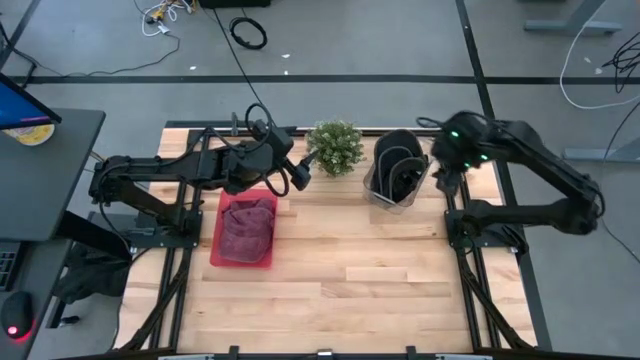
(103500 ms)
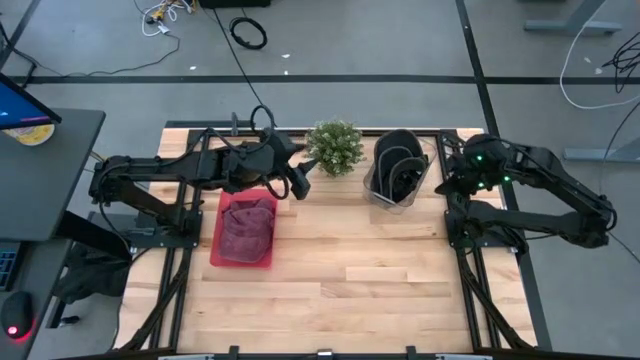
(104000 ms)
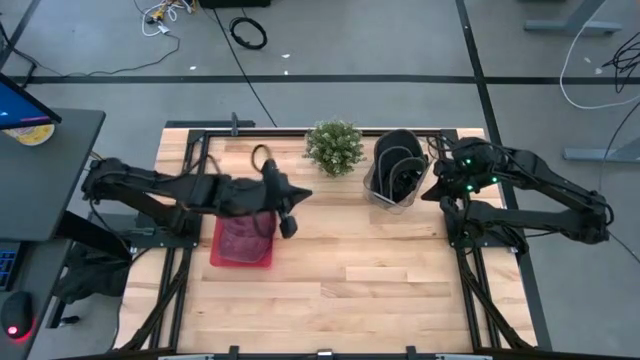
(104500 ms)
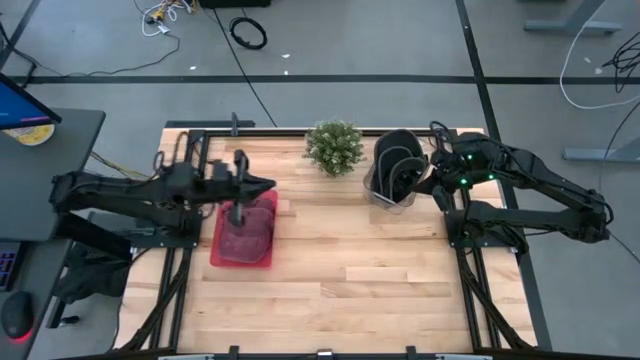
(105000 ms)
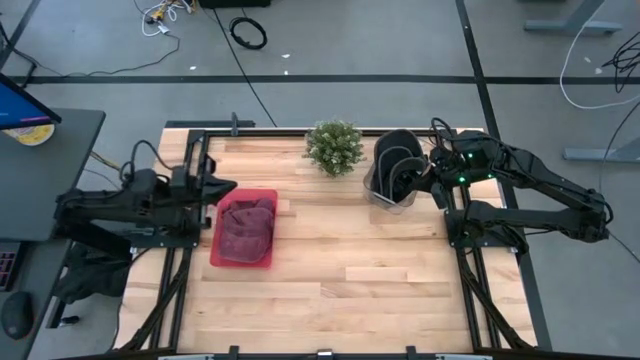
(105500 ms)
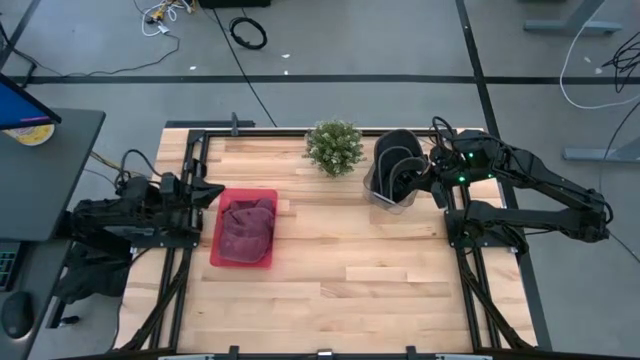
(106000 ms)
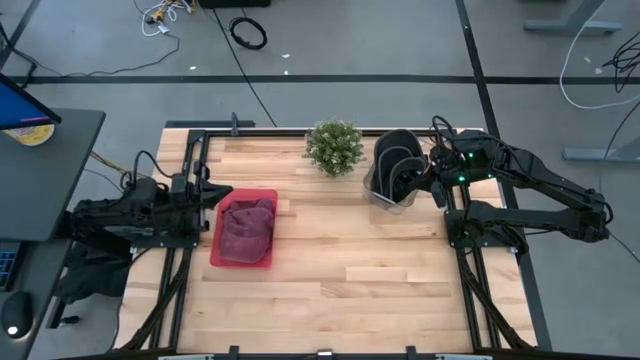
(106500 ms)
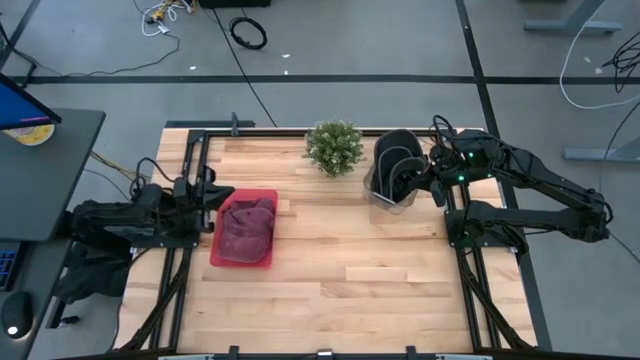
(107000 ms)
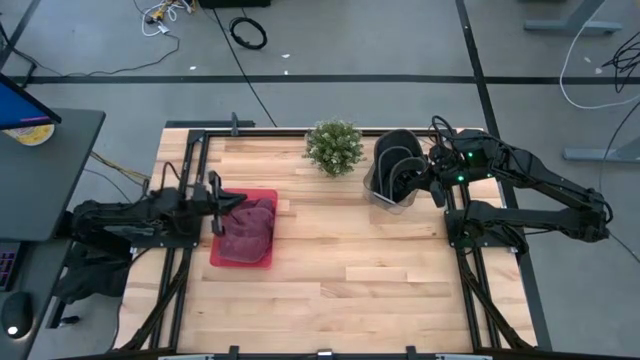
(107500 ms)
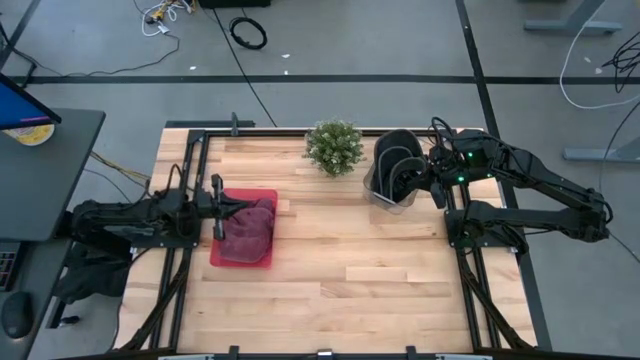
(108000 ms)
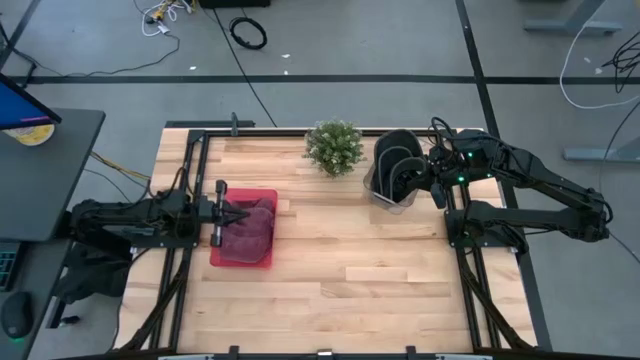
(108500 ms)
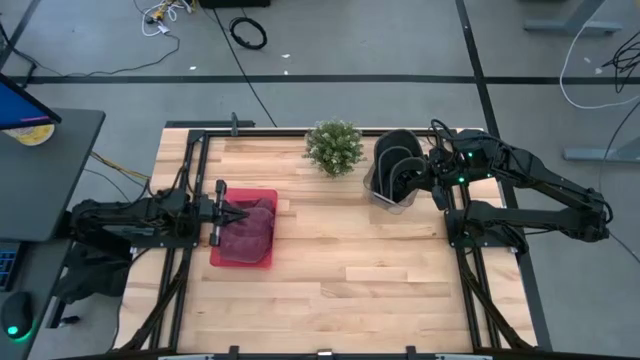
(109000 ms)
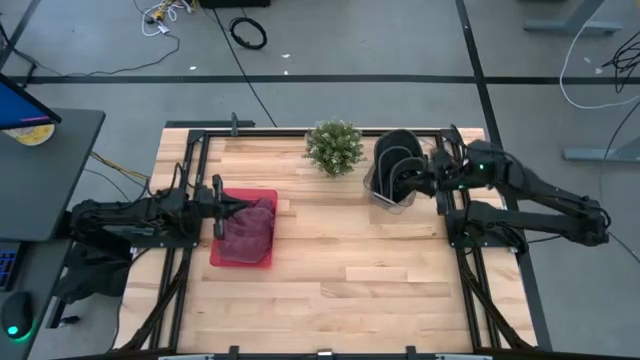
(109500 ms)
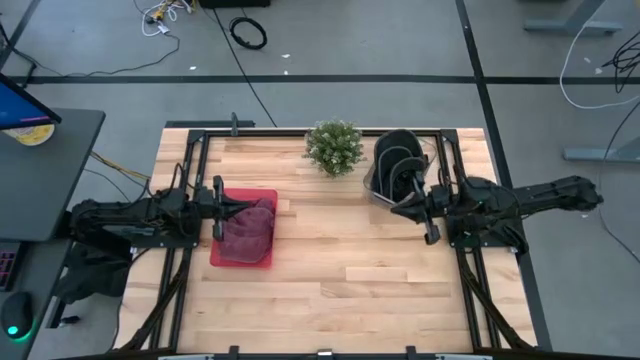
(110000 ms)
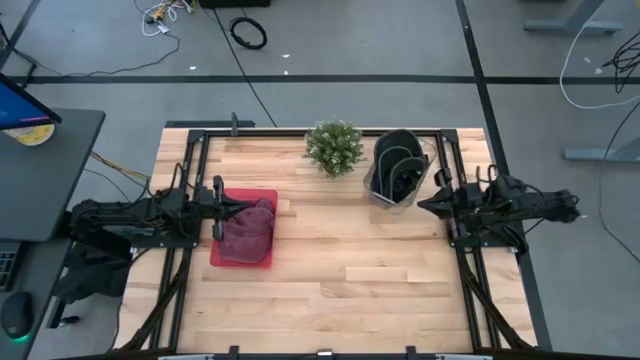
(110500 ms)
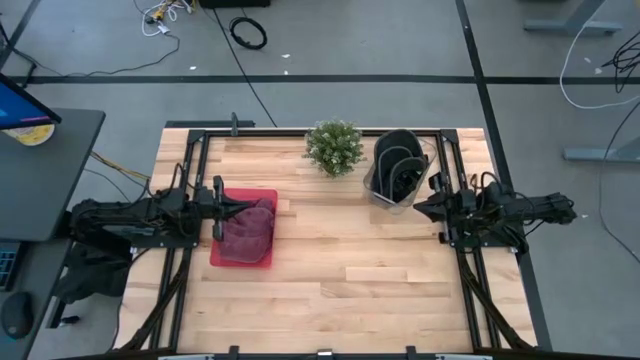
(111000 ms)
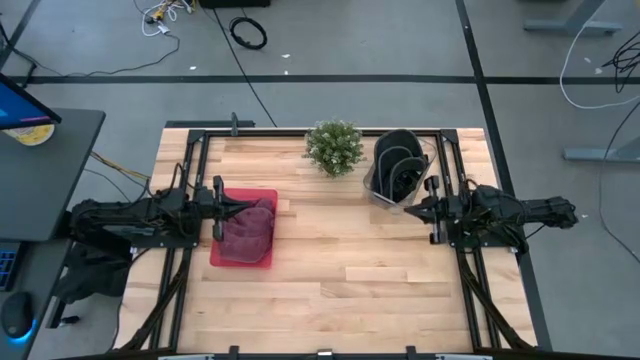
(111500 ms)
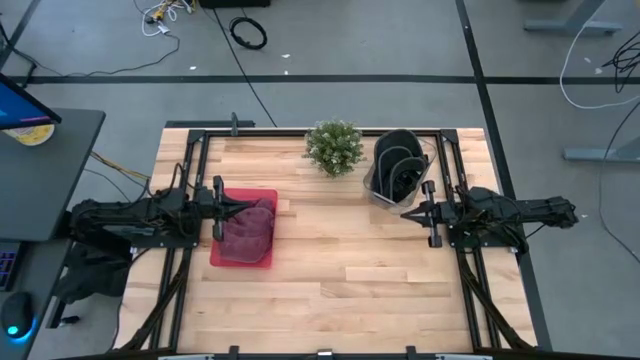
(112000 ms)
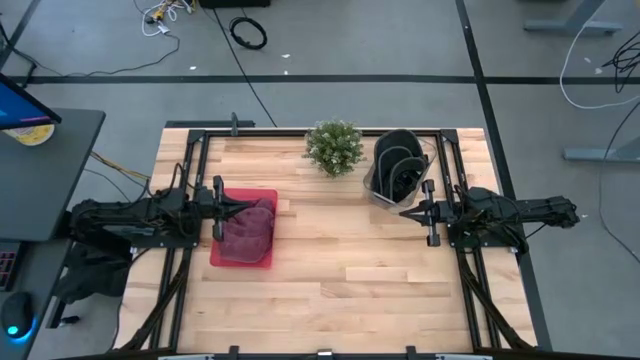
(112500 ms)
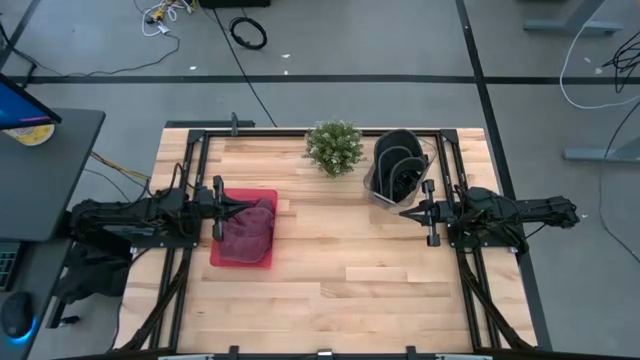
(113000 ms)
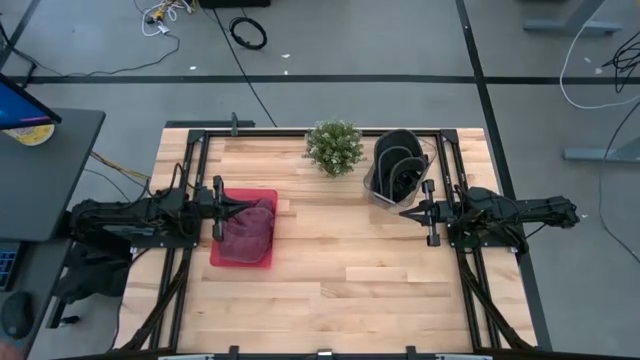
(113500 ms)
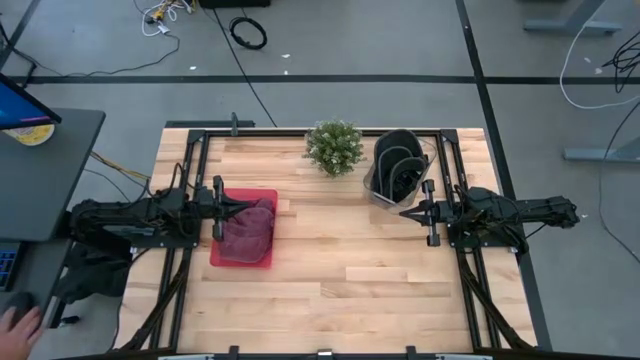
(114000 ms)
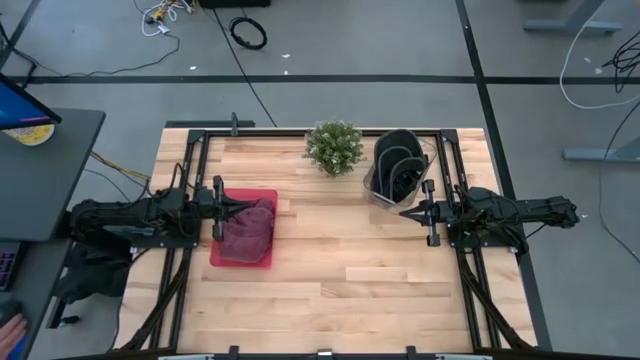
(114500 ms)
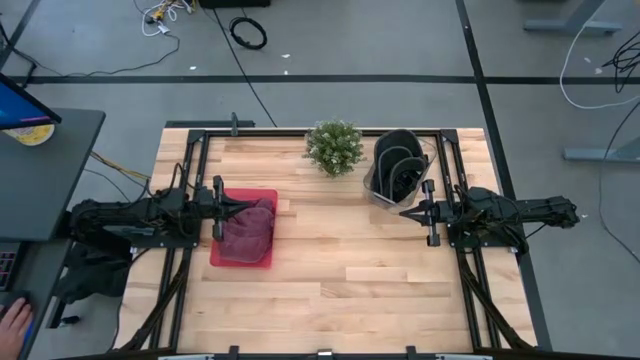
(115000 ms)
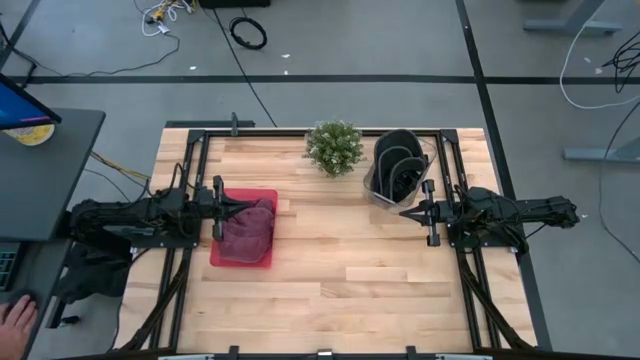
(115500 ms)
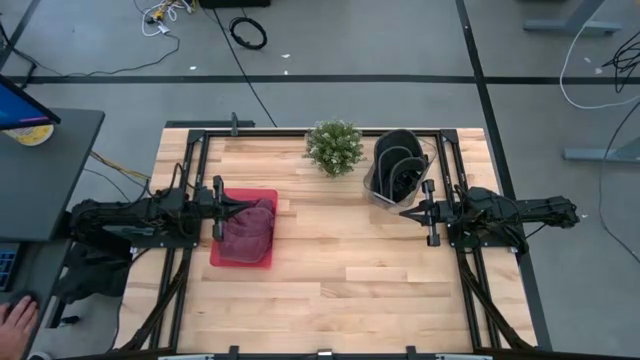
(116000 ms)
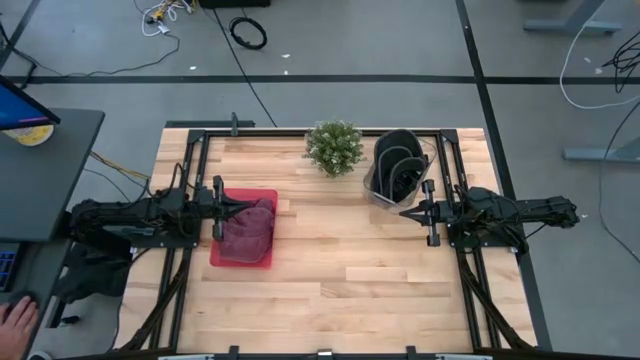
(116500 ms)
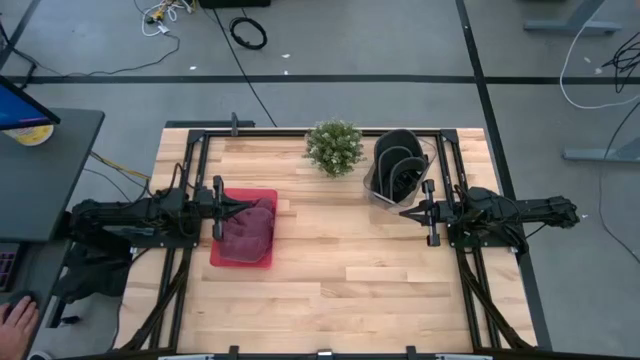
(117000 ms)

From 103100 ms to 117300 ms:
Task: Pick & Place hat
Return to Home Position

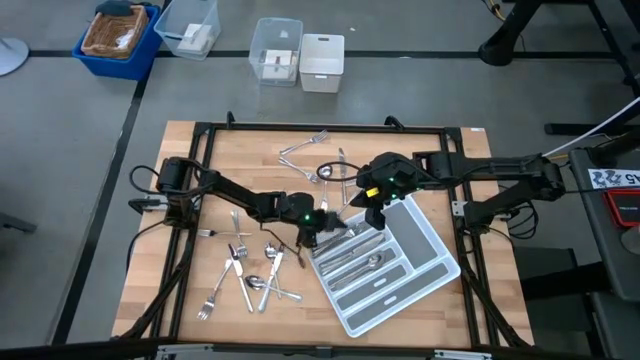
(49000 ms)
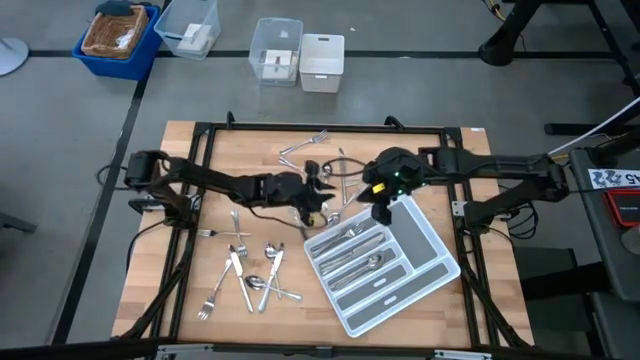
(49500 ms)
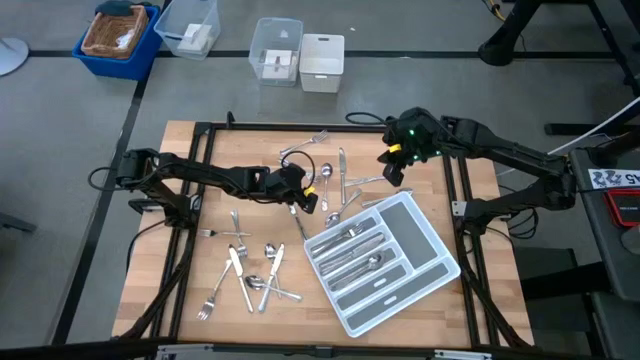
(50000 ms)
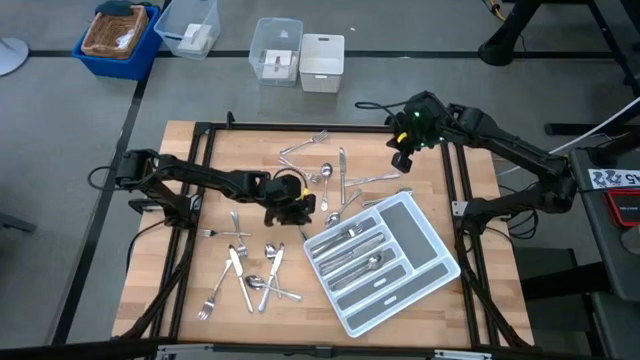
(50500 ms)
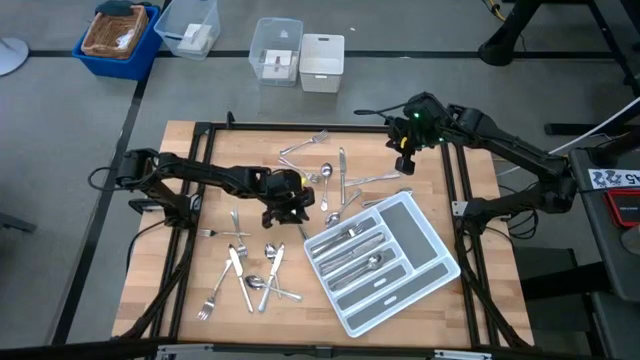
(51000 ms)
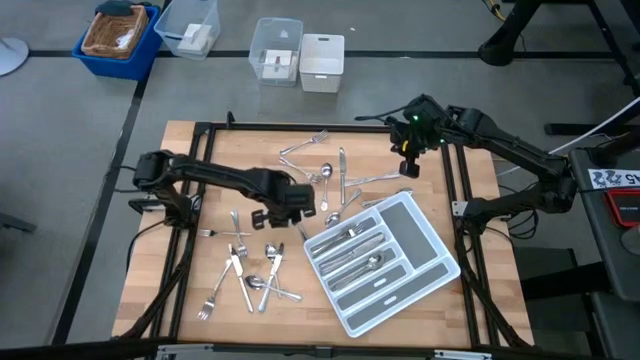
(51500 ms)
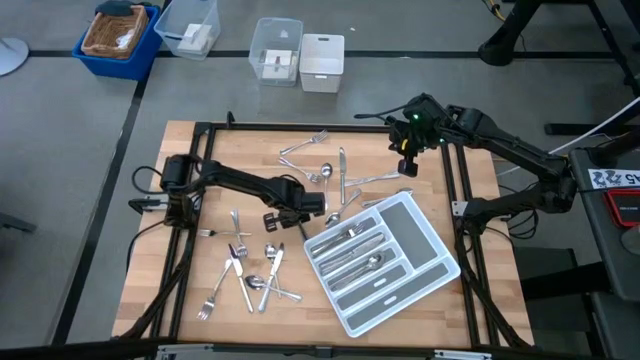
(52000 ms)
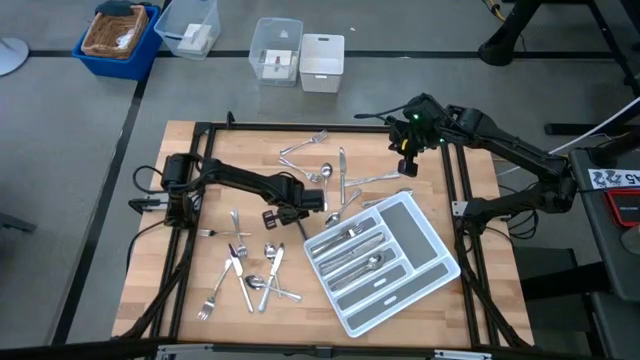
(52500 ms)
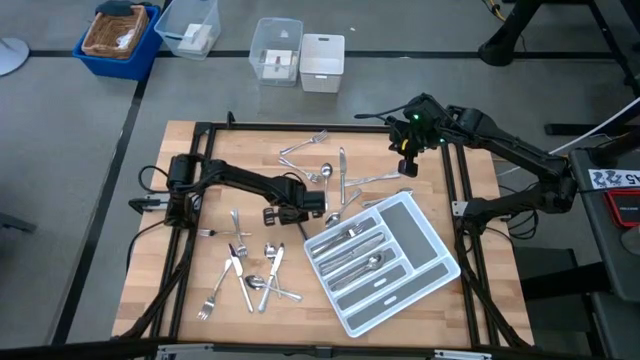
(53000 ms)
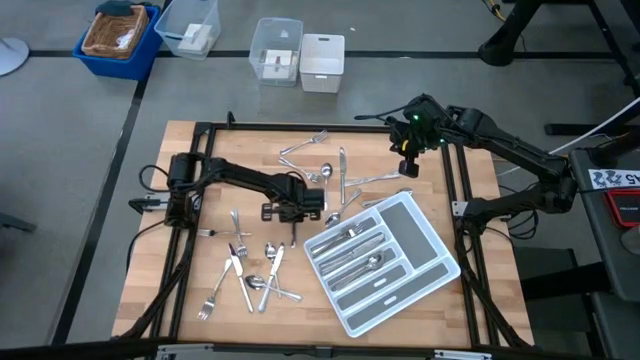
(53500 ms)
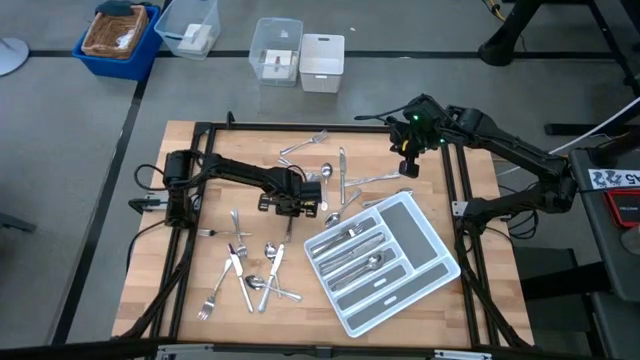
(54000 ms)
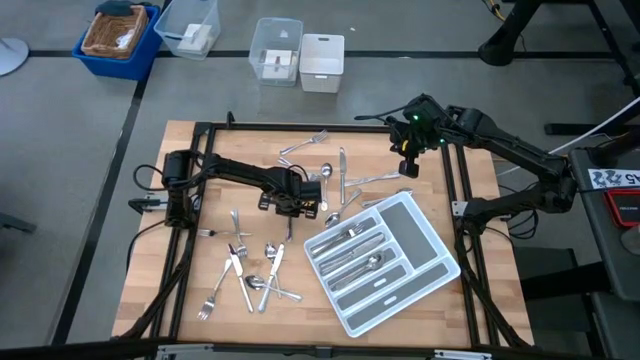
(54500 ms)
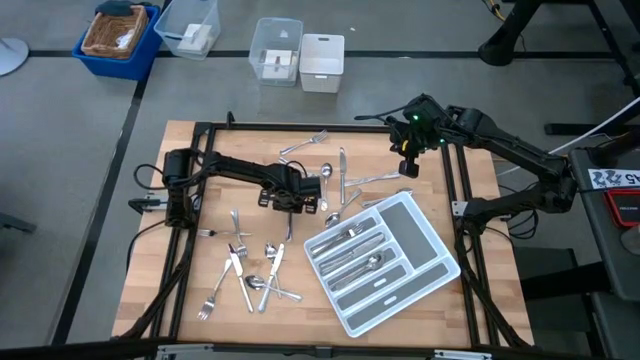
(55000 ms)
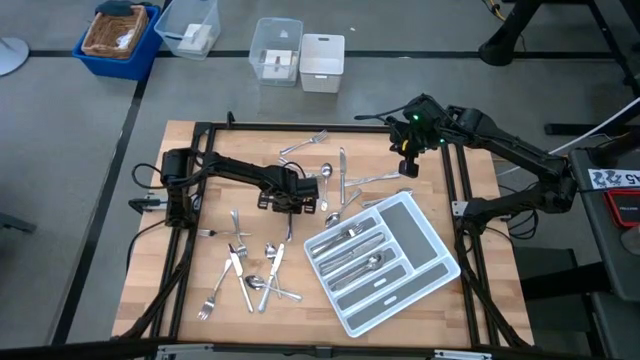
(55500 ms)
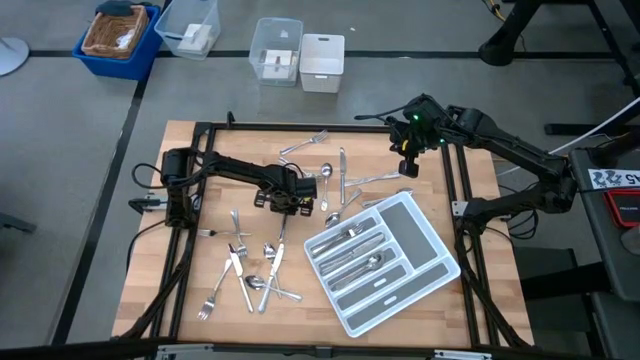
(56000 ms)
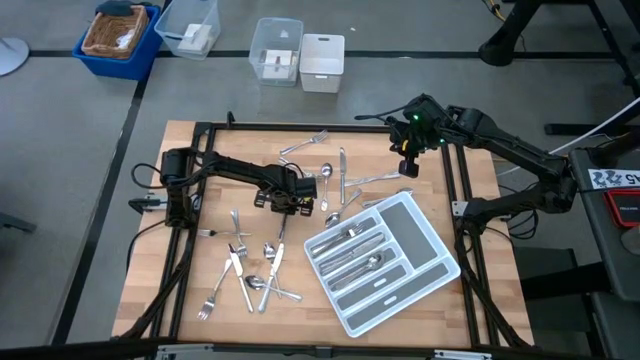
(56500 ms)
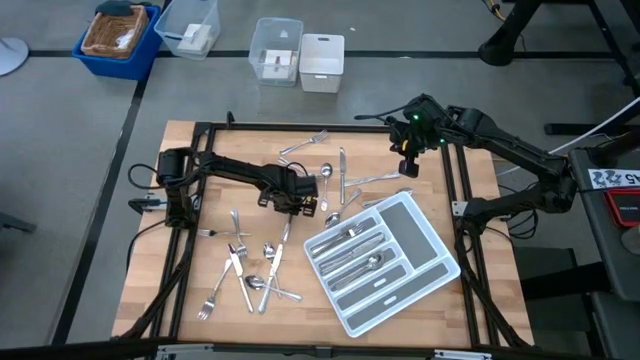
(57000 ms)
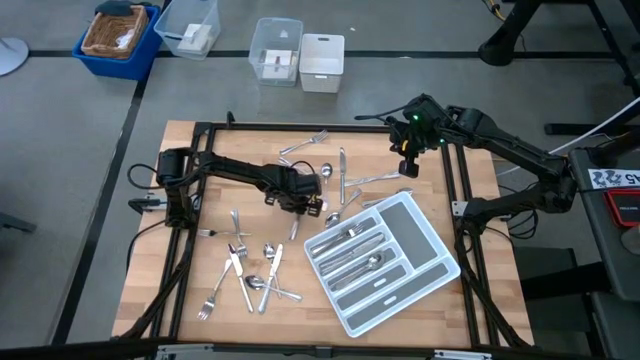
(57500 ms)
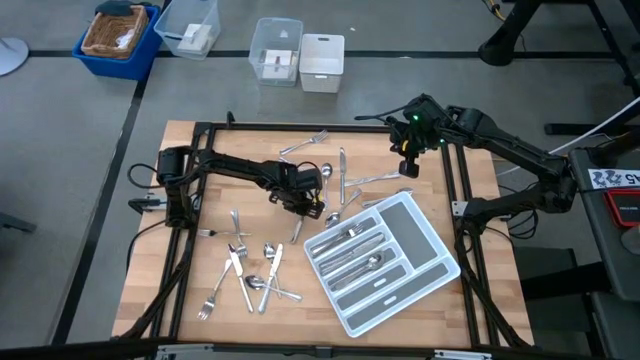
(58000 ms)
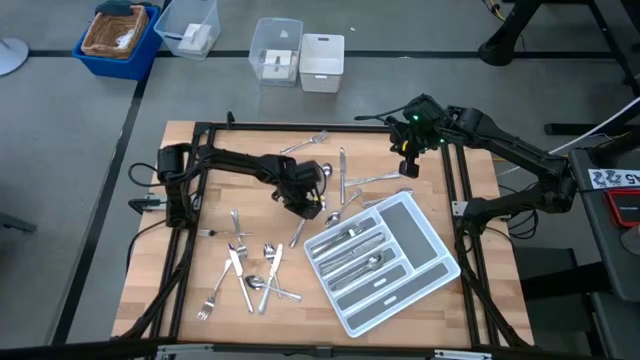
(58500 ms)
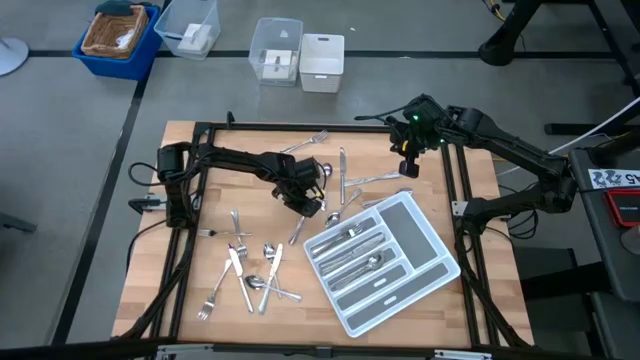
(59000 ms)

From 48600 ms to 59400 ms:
Task: Sort silverware
Put the silver table knife into the silverware tray
